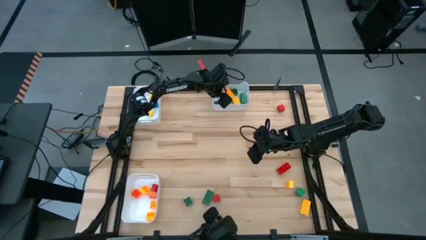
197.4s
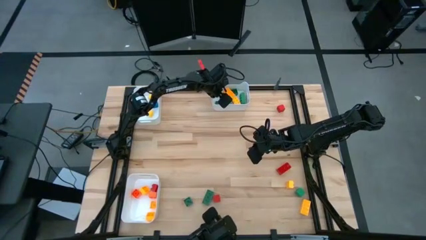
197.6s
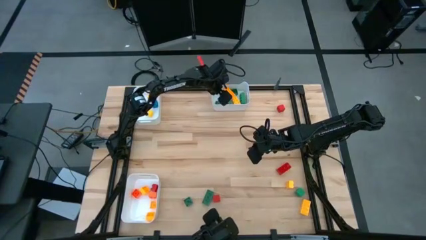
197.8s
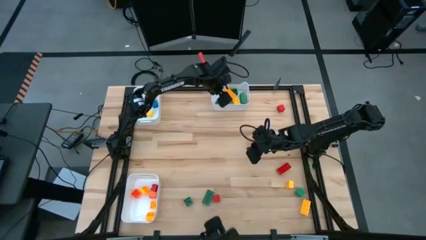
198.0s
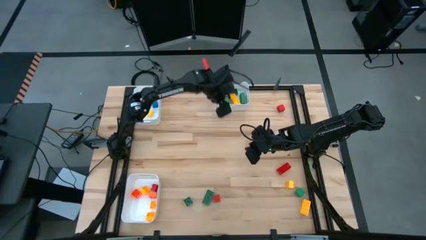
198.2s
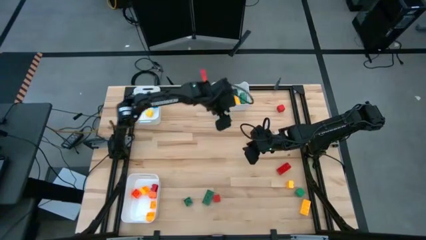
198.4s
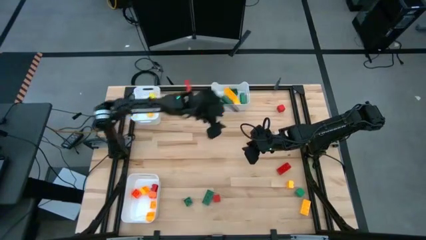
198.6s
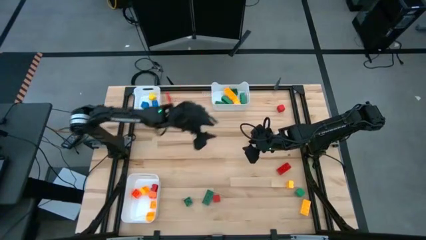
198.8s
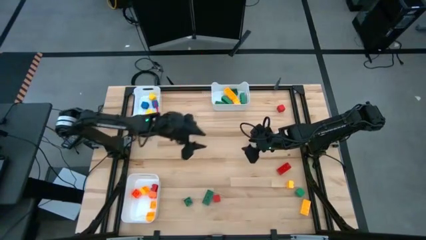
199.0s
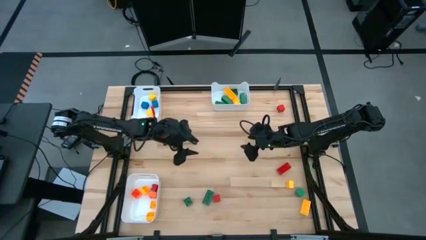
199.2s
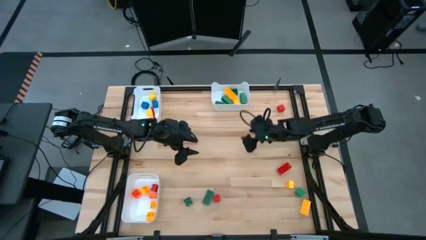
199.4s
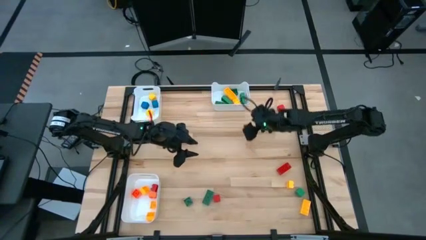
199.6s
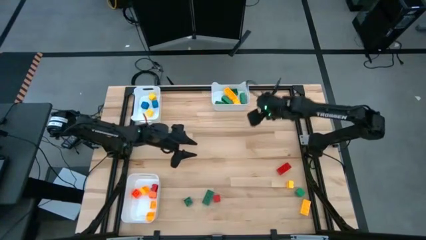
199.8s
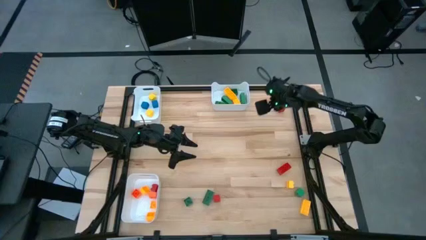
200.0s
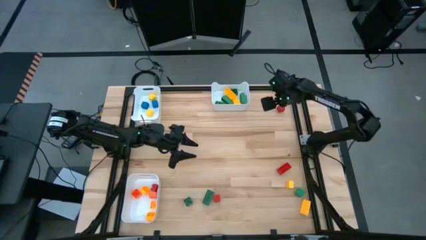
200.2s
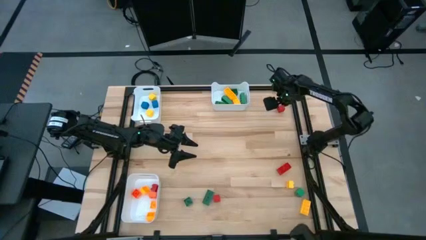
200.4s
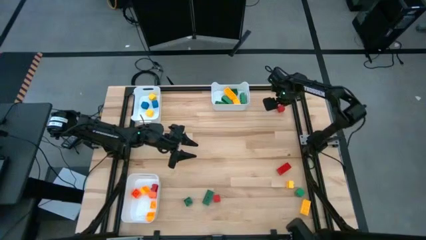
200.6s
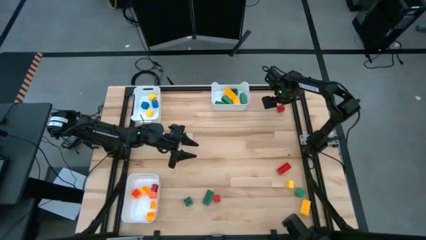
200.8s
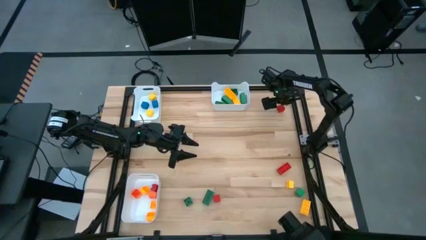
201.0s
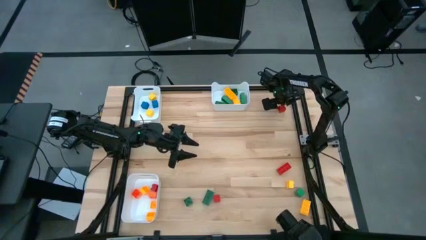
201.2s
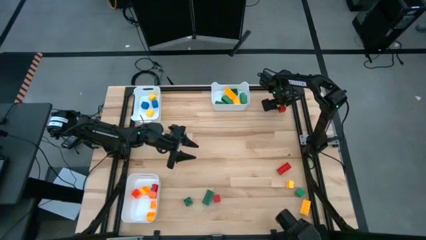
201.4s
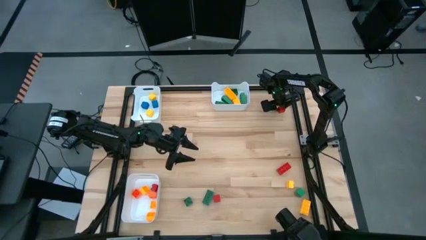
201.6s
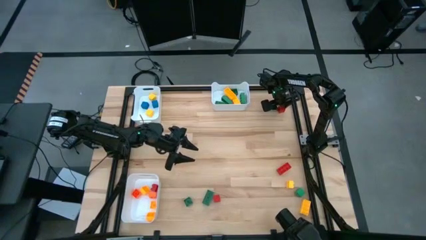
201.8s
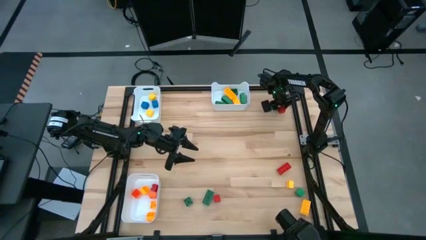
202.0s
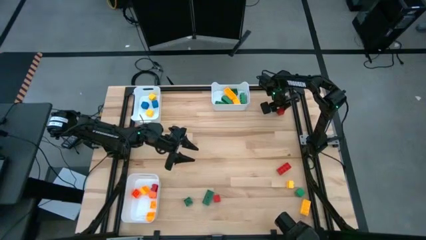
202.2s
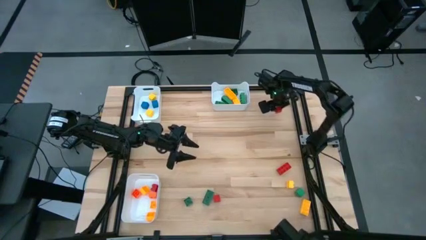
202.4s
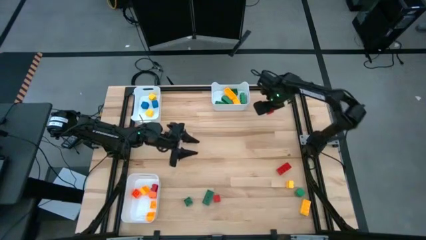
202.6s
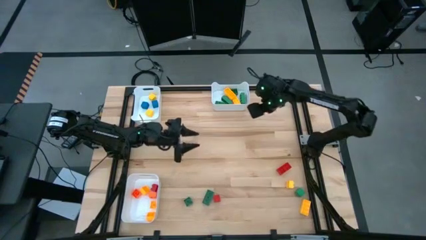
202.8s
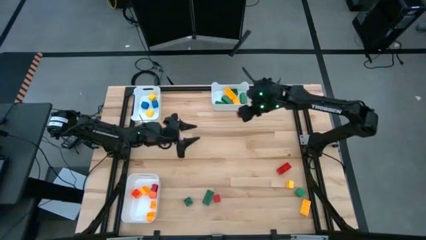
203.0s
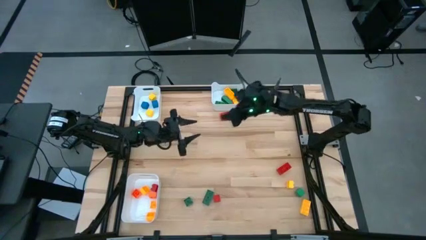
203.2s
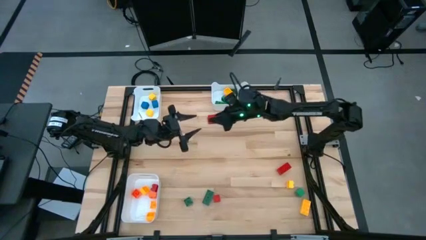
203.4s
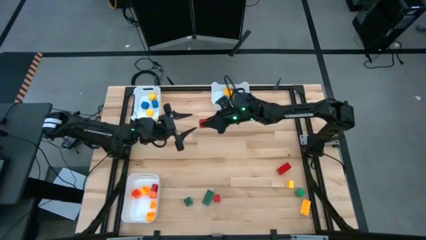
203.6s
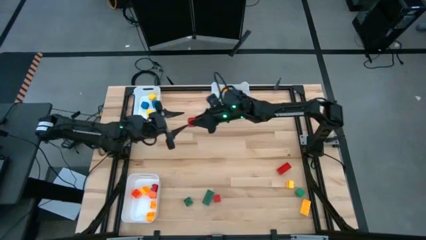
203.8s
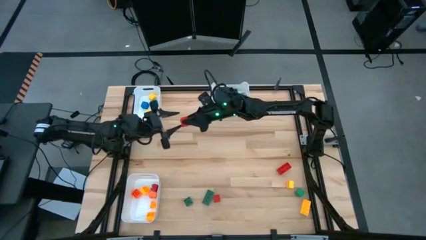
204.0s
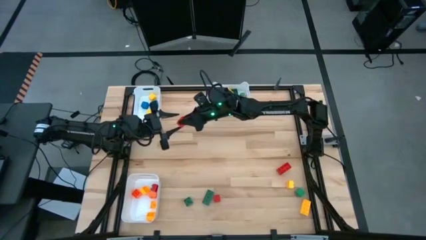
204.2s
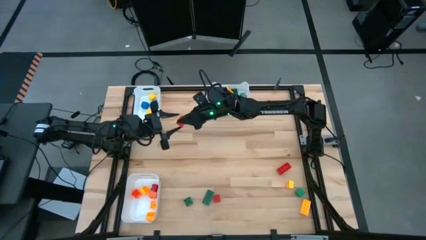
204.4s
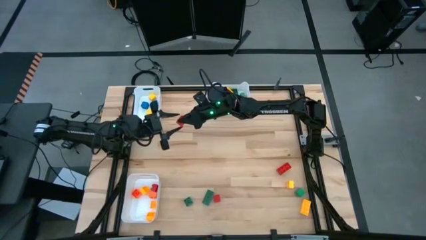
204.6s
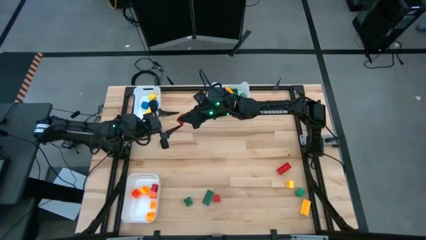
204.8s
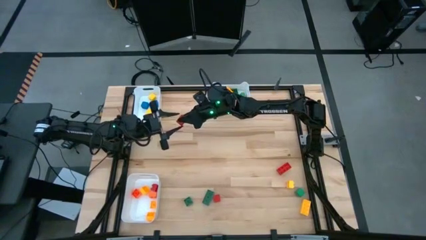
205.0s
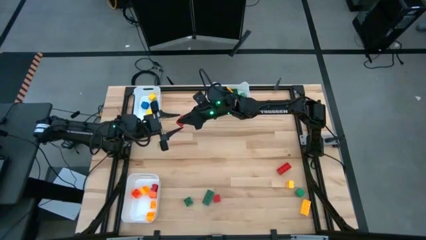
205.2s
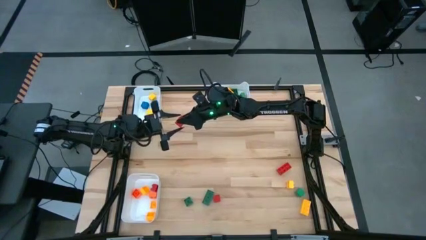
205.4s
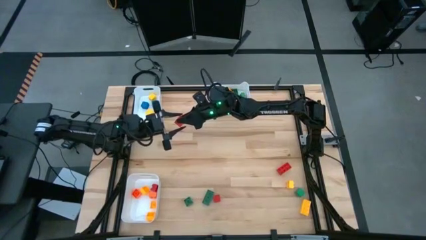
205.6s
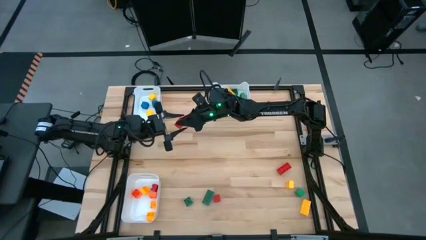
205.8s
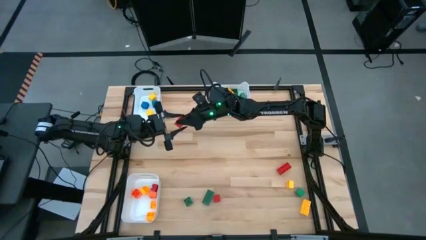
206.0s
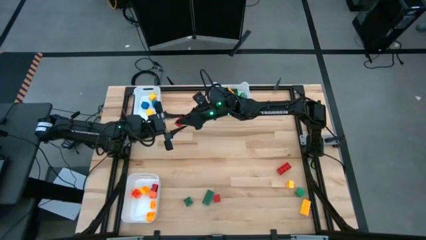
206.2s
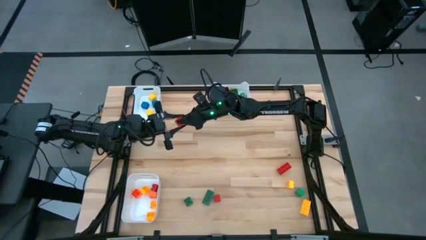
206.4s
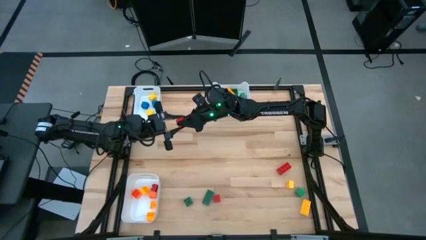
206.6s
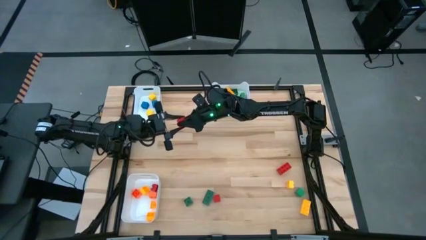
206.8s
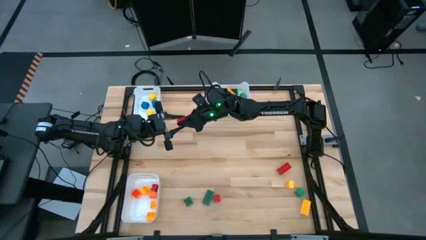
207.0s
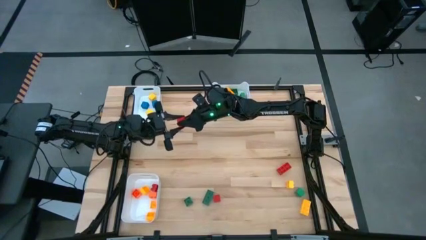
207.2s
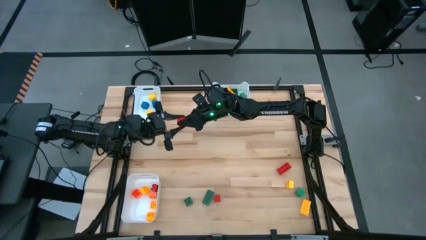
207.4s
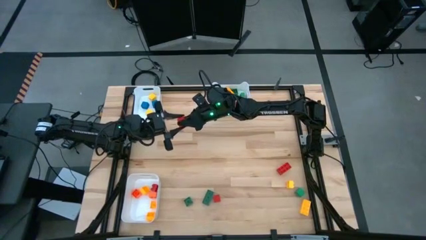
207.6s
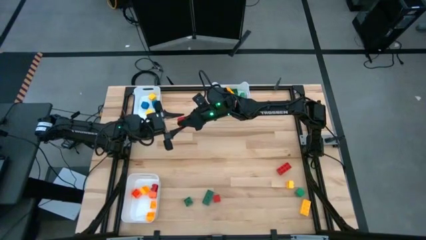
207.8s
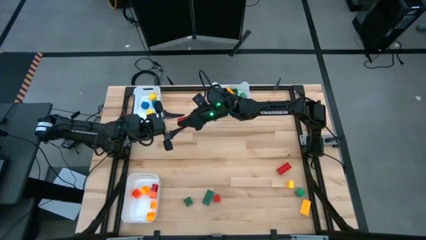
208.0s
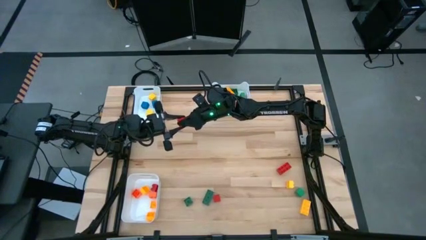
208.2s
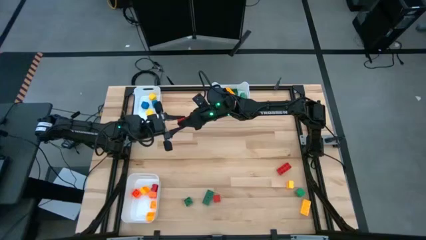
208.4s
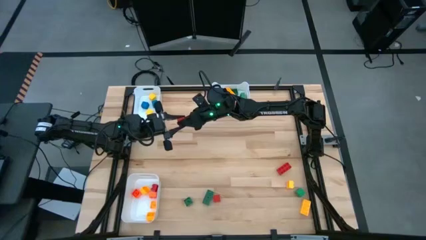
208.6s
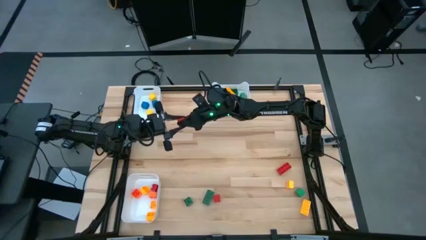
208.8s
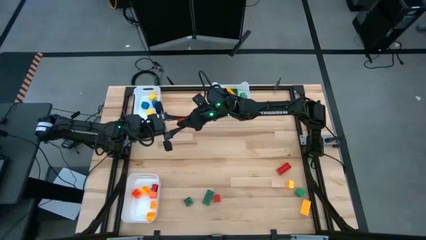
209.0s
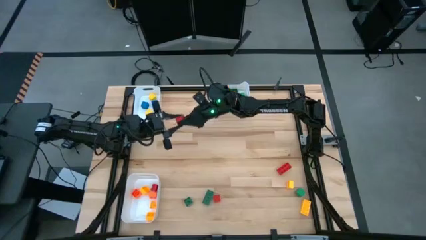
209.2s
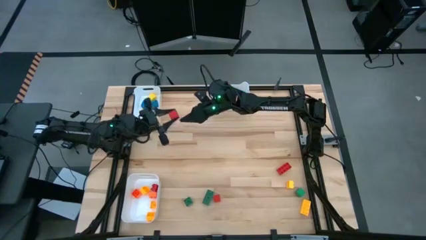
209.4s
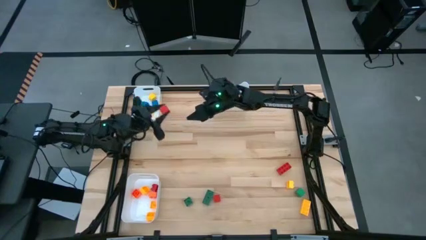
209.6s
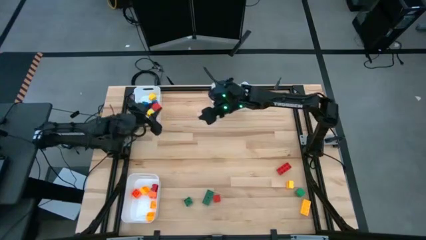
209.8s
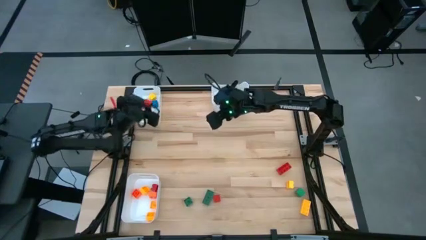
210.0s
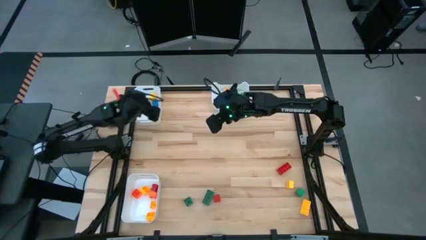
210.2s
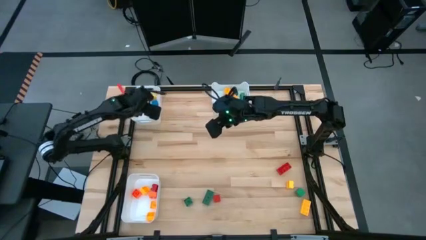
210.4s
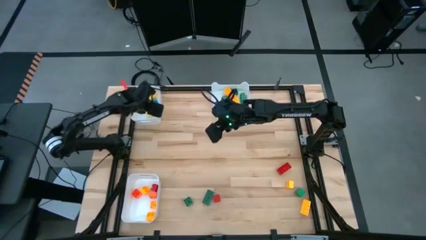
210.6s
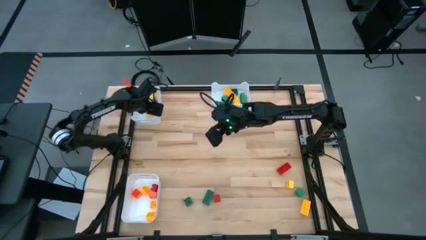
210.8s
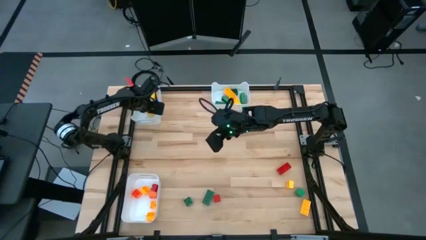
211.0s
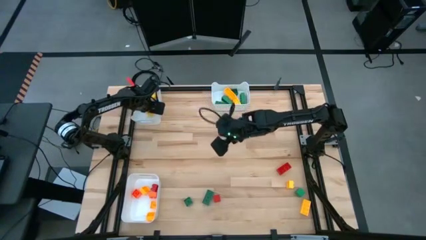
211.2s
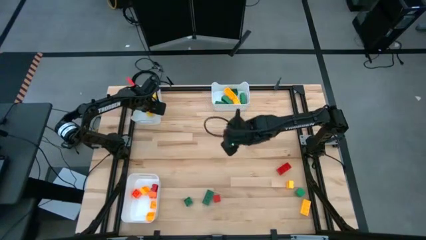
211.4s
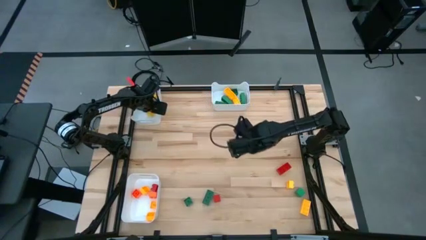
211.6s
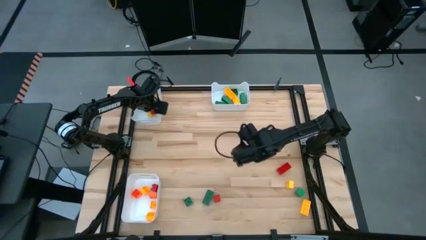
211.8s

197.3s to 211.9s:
Task: Sort blocks by size
Put the red block into the top left white bin

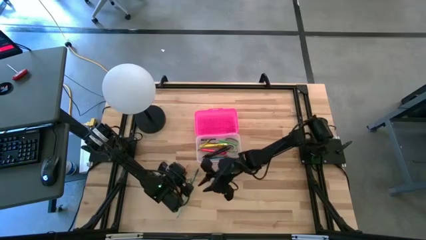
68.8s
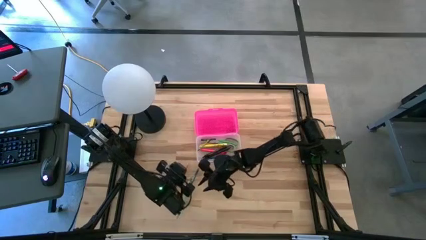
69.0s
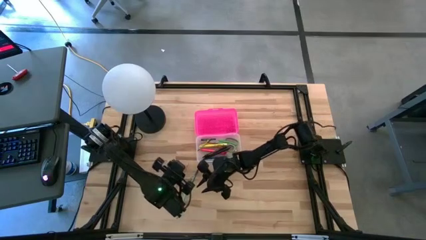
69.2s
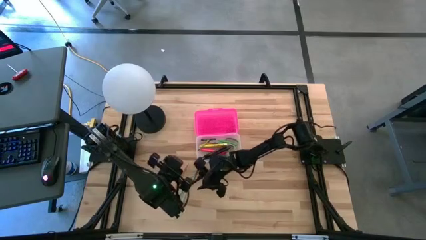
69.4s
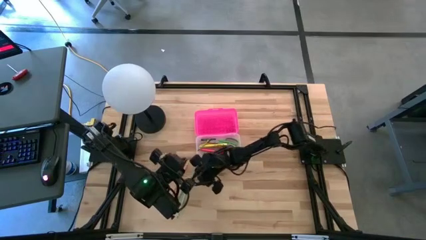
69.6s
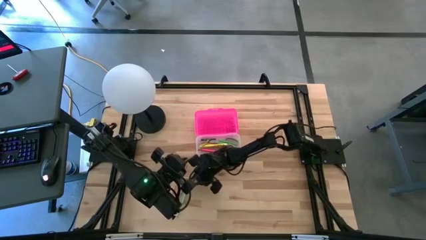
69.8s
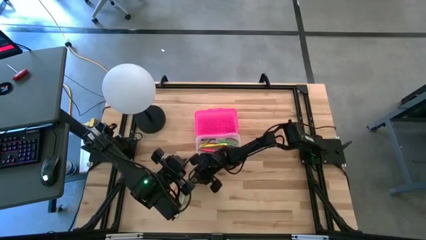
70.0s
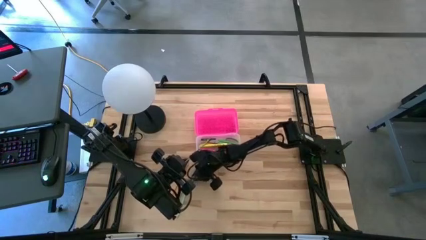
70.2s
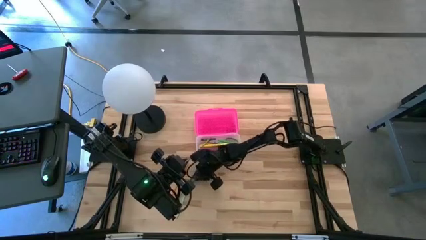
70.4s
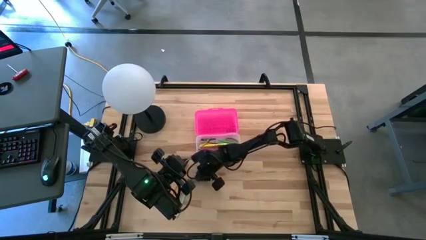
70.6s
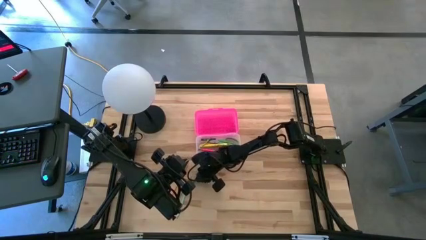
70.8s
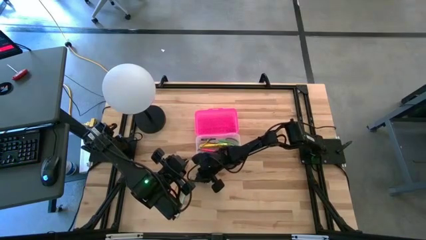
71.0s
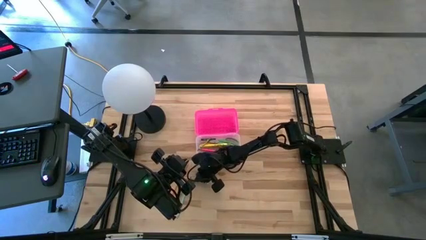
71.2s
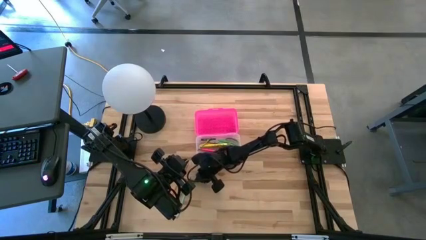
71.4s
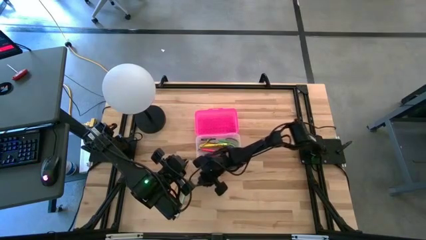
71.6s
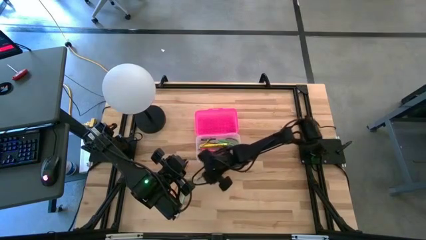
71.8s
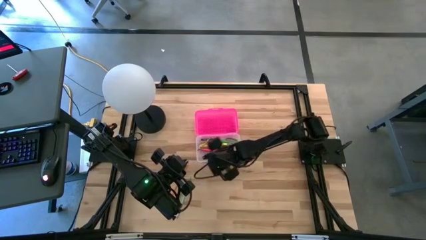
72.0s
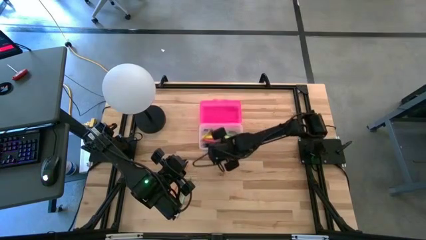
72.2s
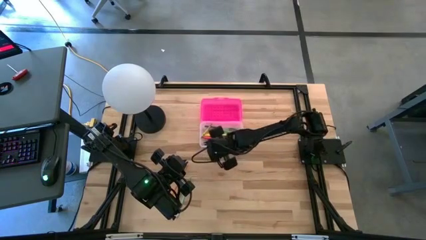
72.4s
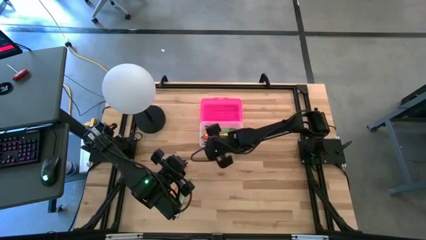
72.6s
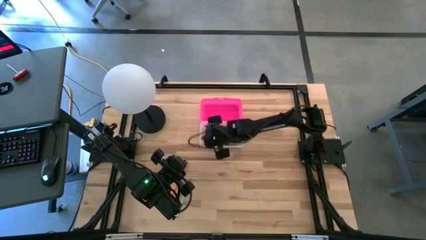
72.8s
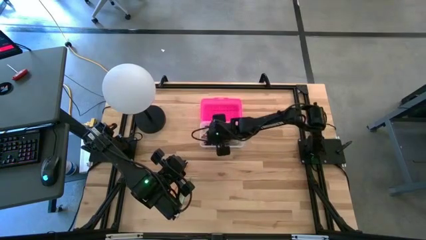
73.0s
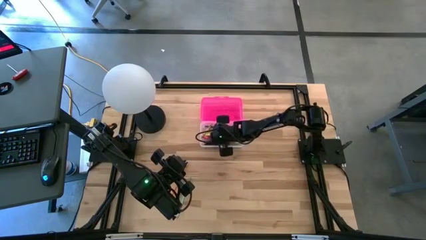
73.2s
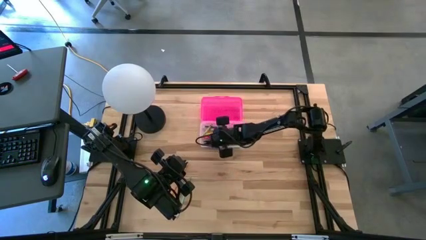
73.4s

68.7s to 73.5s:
Task: Pick & place school supplies into a supply box
Put the dark green crayon into the pink supply box
